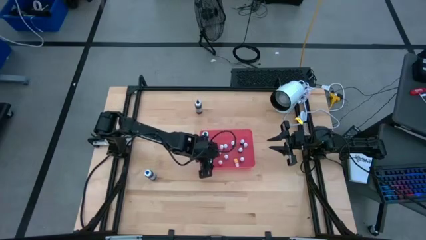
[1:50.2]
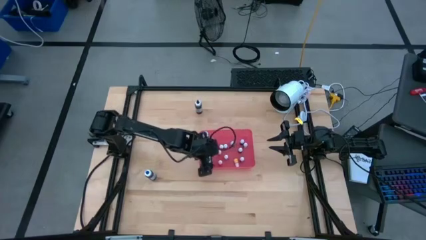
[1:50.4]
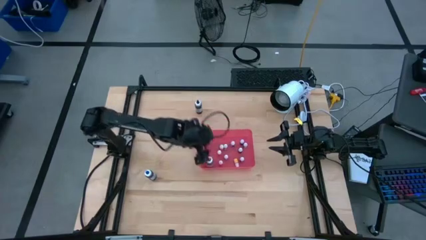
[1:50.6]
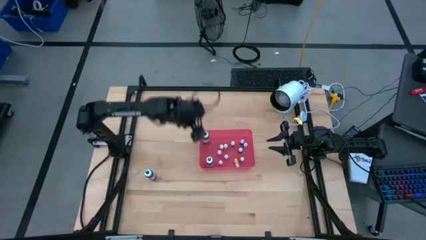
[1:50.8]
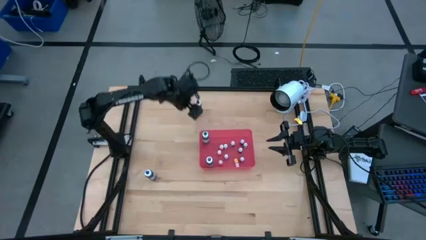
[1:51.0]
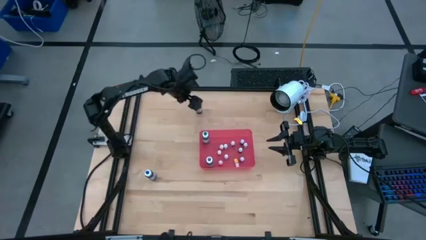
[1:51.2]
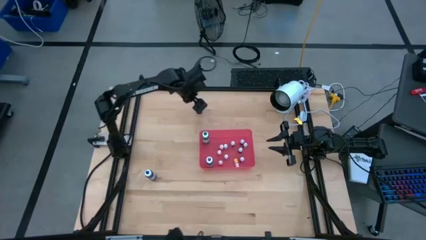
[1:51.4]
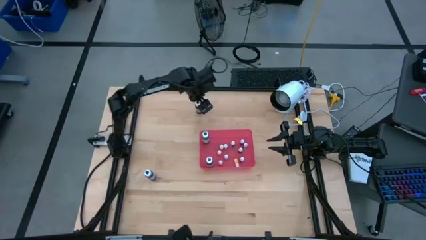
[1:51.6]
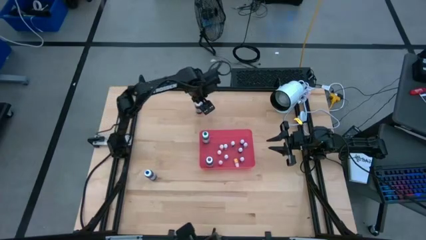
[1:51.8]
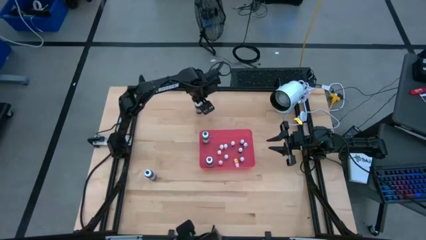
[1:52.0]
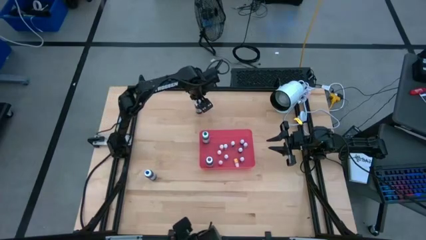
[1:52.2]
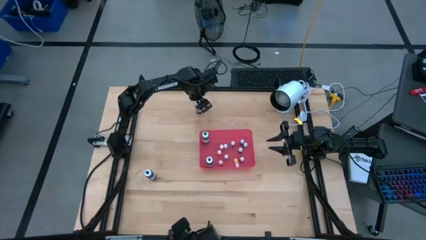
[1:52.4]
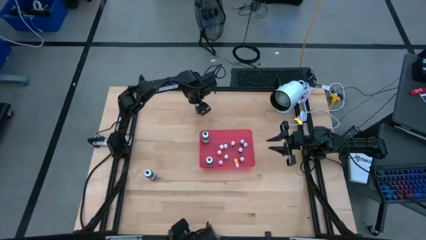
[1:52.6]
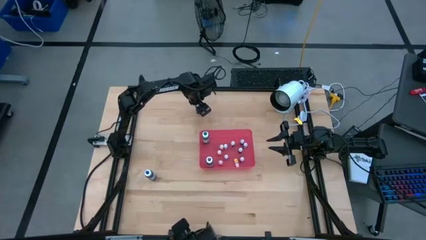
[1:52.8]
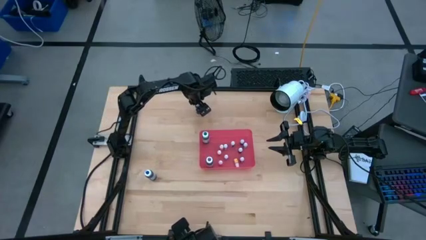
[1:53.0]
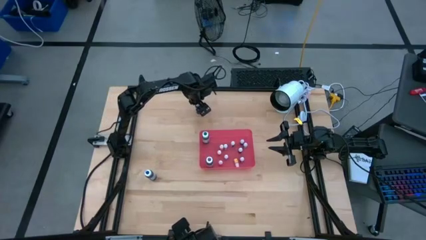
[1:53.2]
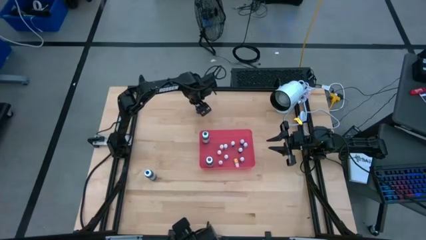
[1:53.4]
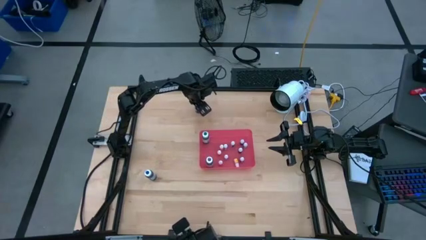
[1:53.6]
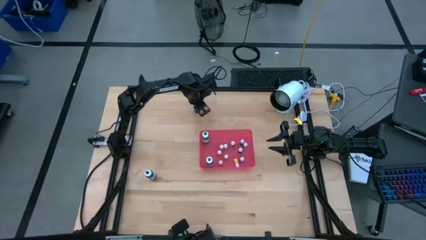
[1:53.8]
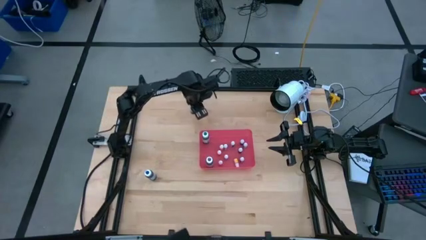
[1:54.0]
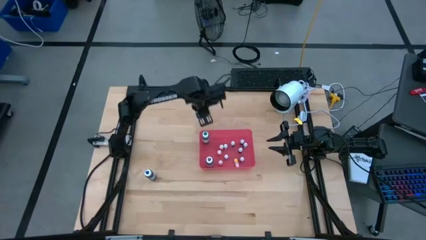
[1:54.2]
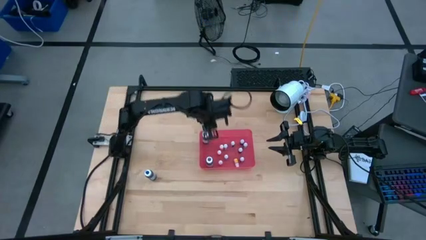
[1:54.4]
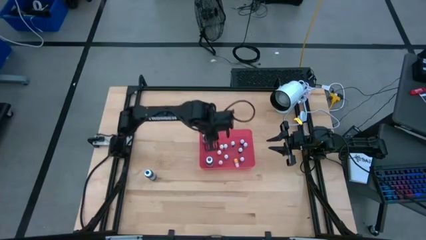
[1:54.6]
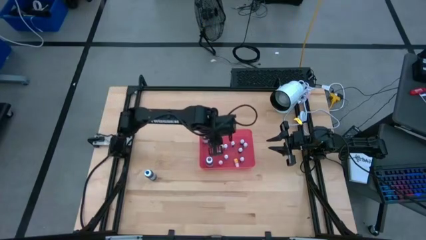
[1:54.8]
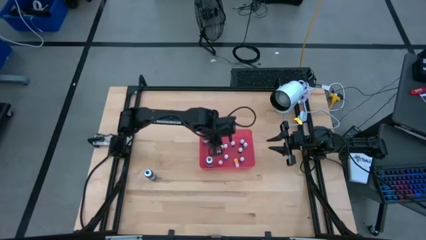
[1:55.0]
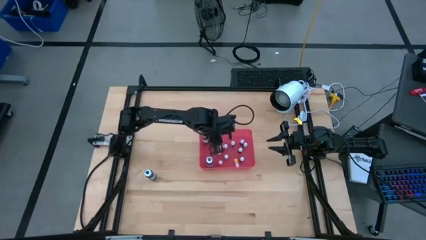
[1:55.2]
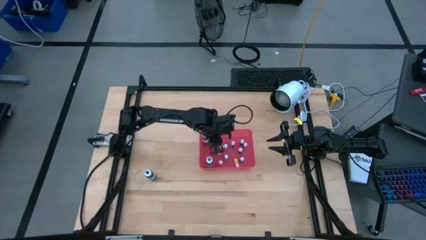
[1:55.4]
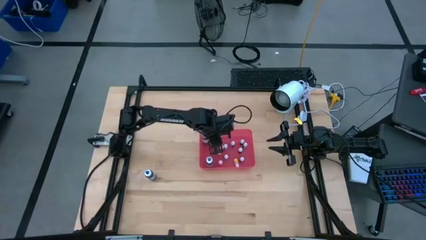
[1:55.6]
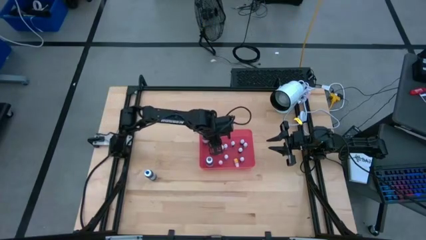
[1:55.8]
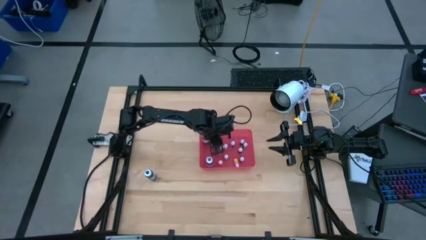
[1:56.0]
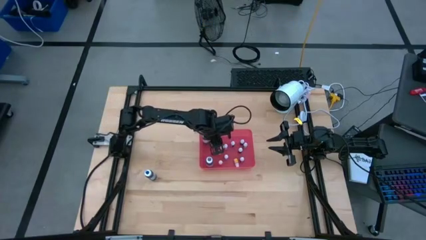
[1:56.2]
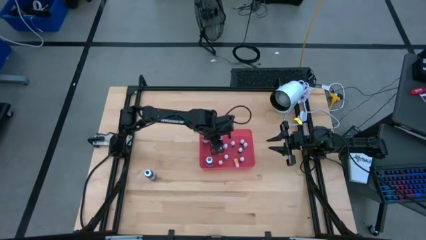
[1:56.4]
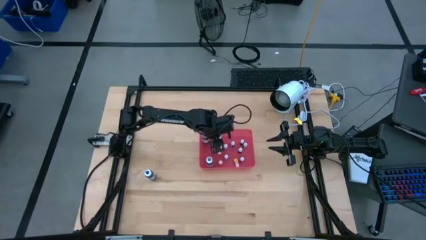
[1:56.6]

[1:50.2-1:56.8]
Task: Pick & Place food coloring
Put the big black food coloring bottle into the red bin

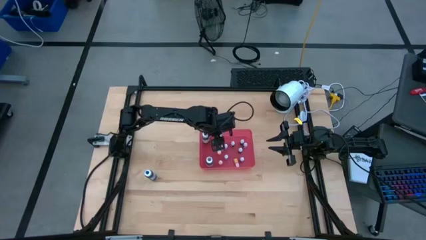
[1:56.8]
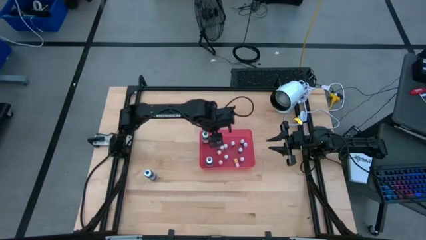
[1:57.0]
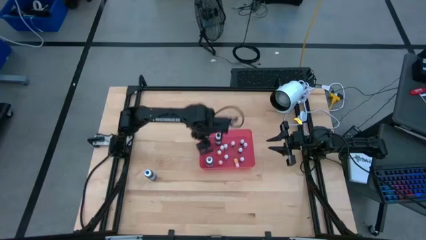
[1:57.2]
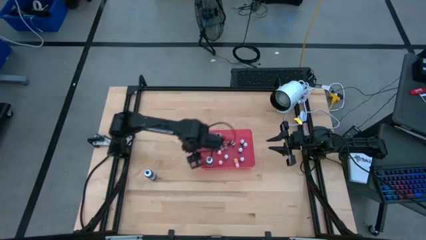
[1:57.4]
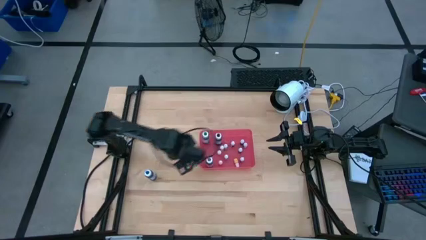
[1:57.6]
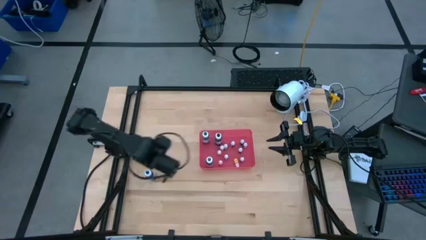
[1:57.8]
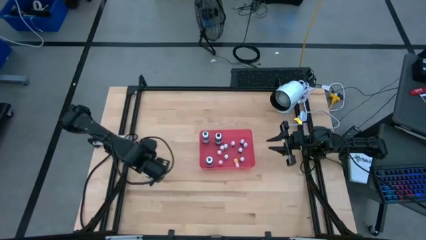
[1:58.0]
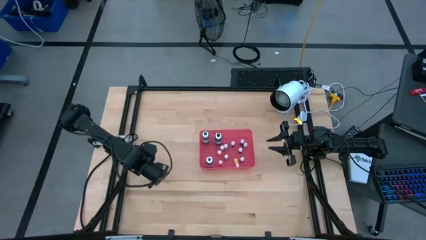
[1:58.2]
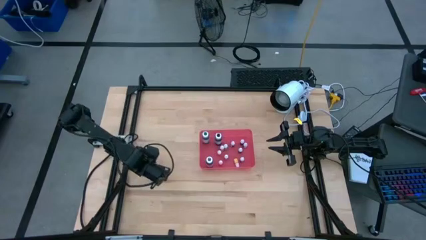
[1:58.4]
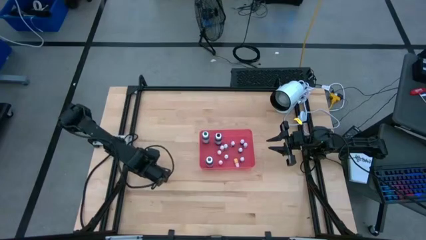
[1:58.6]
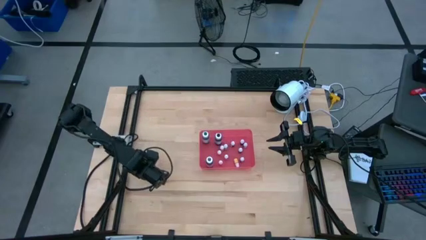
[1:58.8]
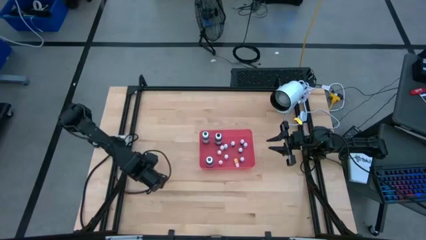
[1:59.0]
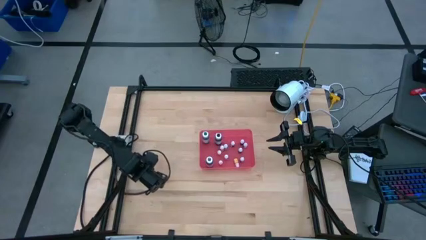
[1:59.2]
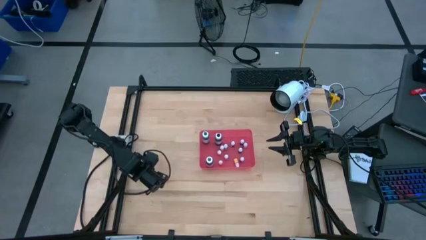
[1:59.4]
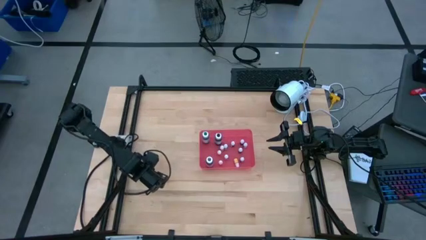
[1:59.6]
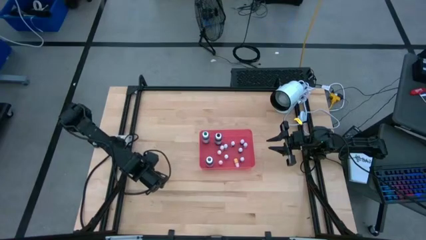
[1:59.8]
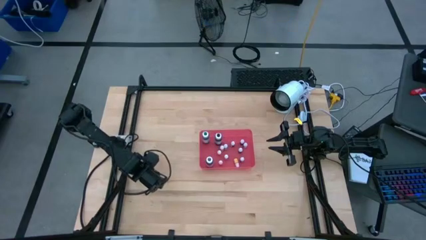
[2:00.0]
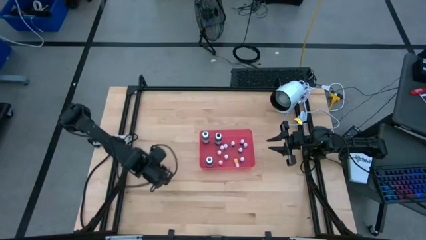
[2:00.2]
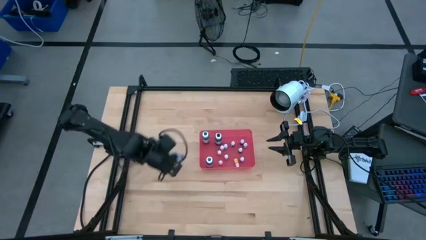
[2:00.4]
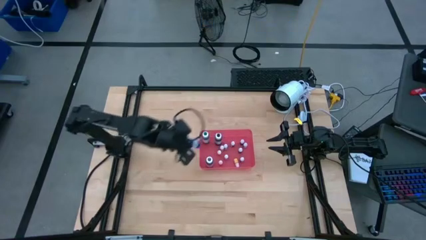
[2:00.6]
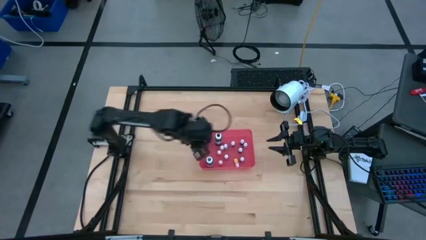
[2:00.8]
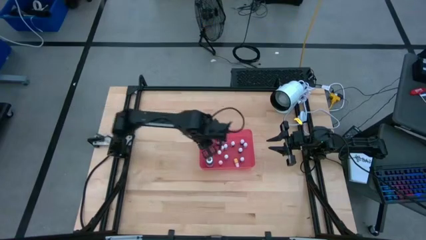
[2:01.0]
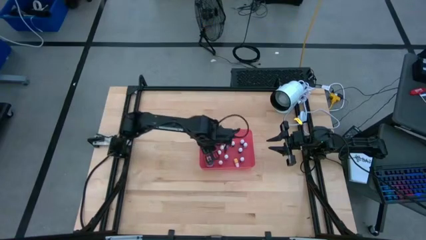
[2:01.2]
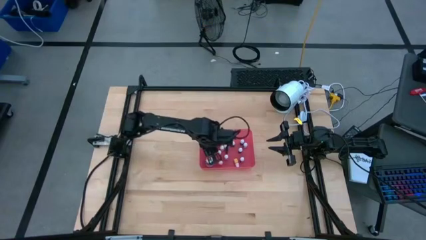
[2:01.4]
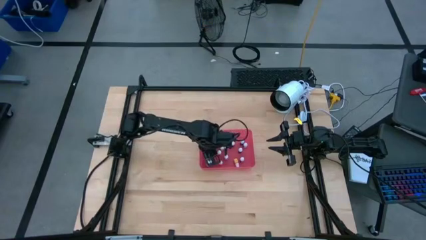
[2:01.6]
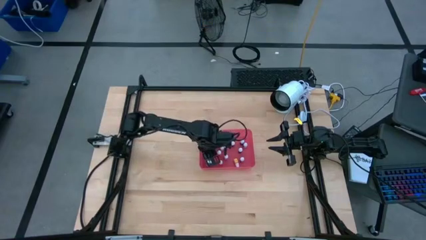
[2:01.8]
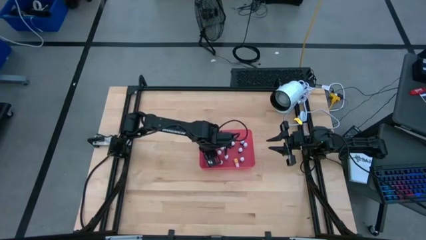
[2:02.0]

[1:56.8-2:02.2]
Put the big blue food coloring bottle into the red bin

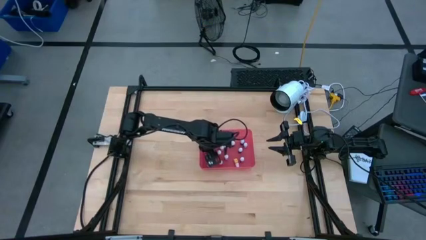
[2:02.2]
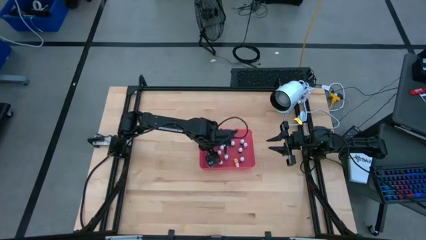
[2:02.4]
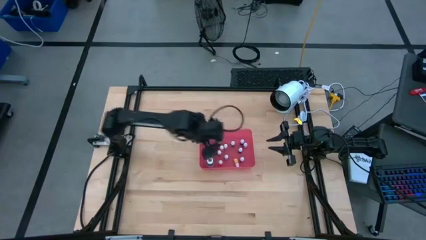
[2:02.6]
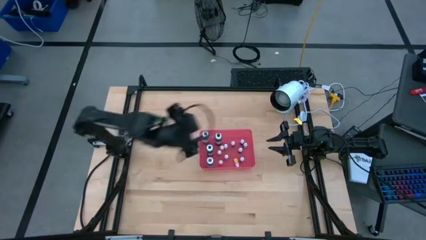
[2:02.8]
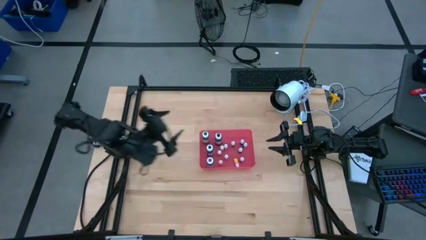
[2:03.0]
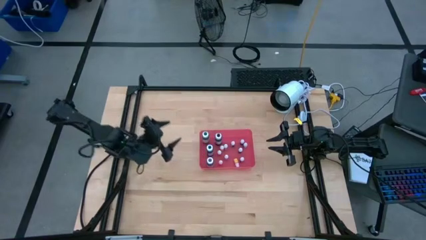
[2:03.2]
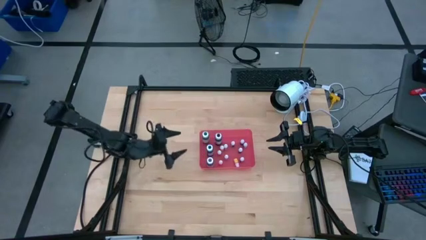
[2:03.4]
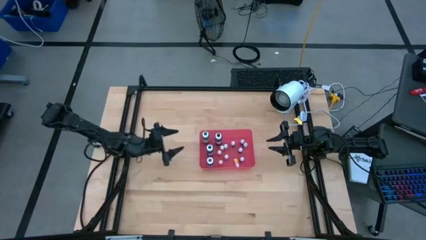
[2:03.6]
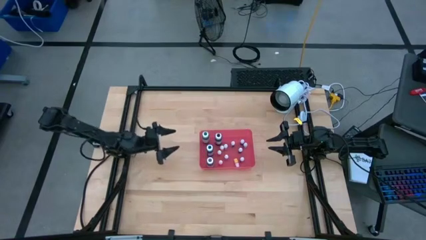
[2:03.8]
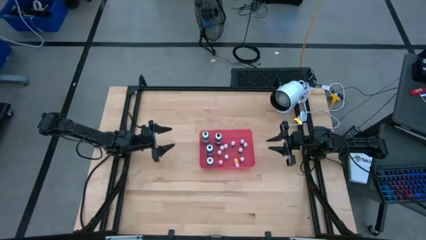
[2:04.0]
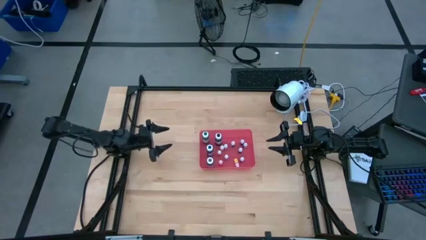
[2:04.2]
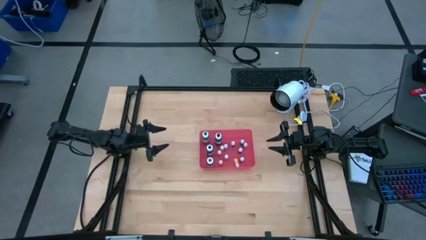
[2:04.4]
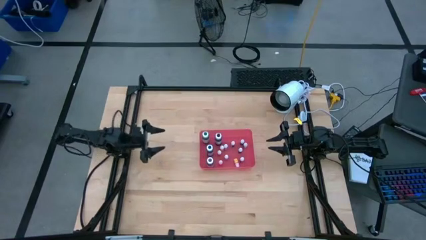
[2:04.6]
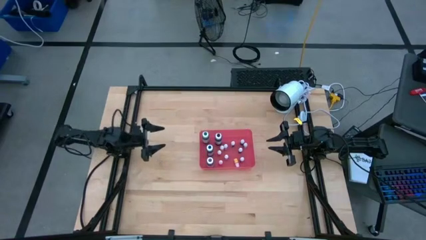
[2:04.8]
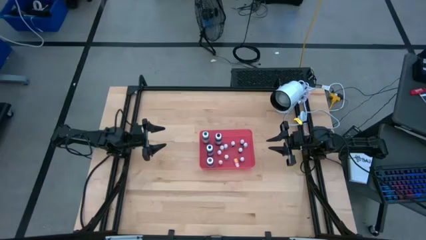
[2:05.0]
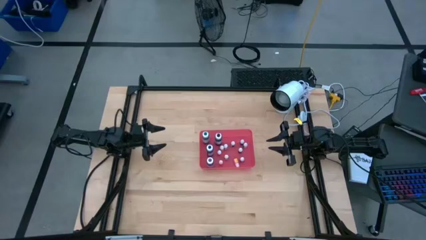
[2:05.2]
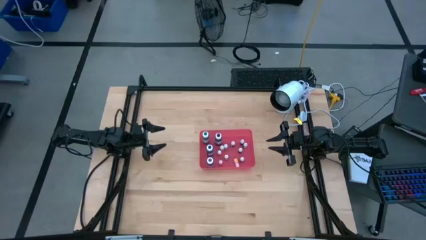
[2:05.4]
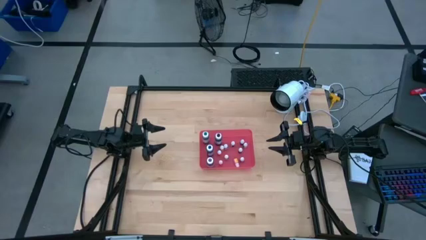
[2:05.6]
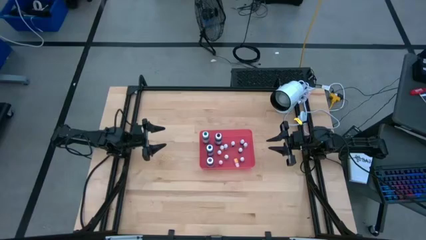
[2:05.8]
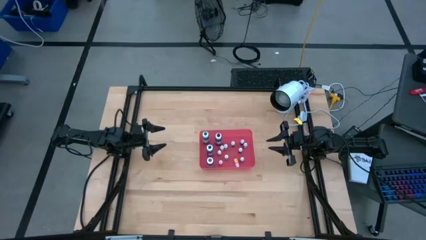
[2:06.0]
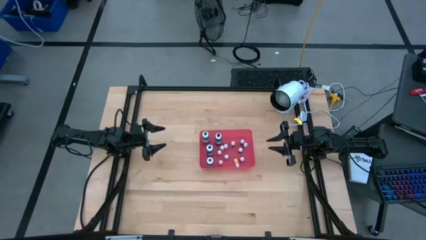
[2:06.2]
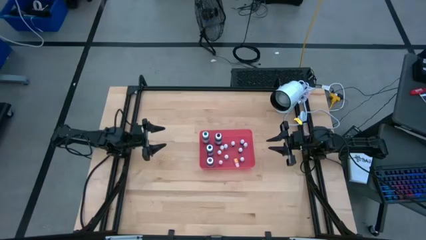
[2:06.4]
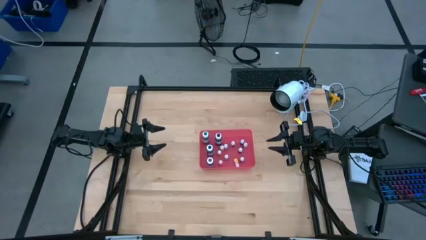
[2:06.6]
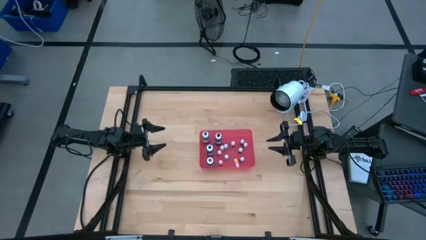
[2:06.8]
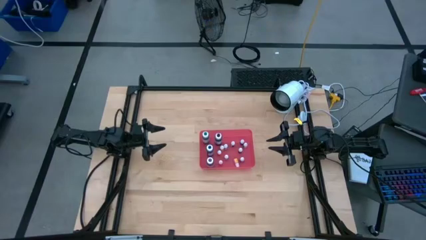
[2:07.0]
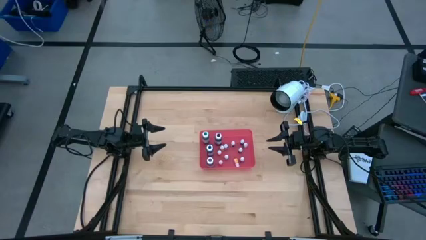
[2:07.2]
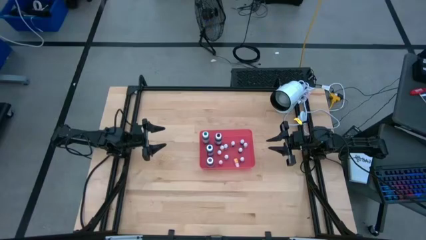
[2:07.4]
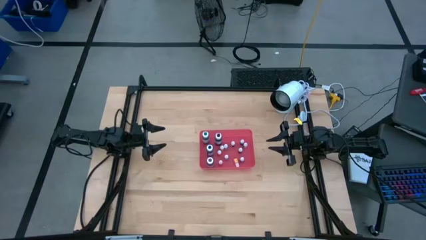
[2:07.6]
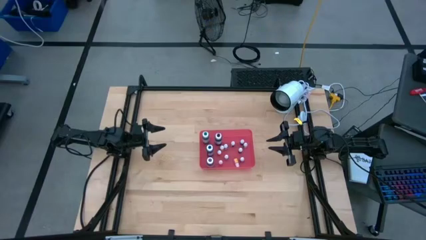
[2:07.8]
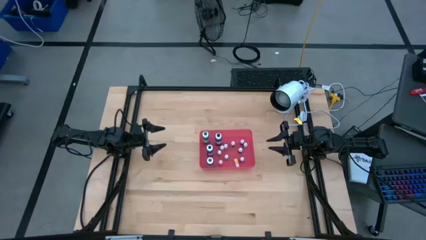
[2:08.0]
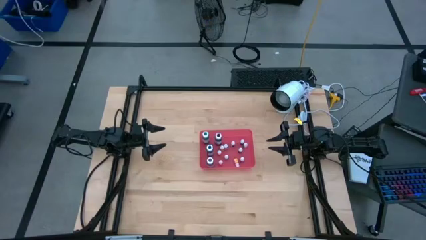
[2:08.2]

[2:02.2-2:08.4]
Return to Home Position
